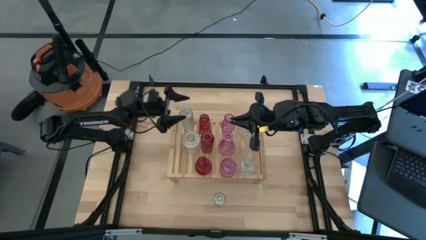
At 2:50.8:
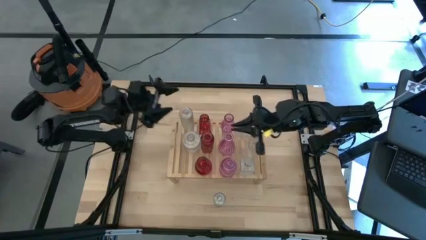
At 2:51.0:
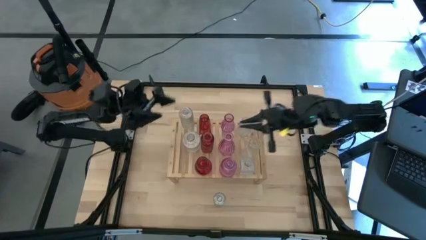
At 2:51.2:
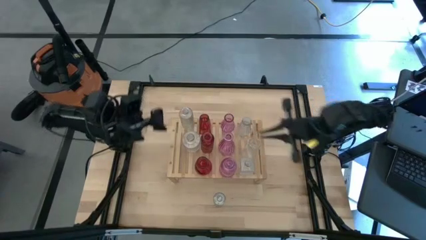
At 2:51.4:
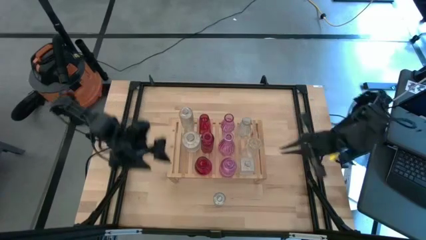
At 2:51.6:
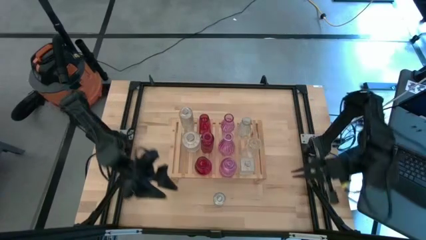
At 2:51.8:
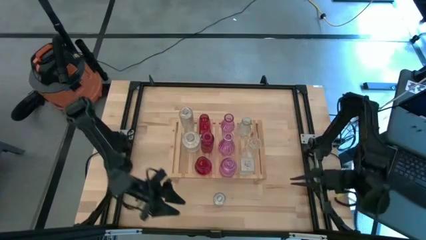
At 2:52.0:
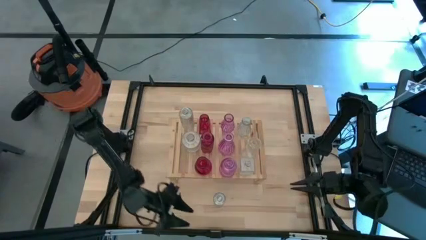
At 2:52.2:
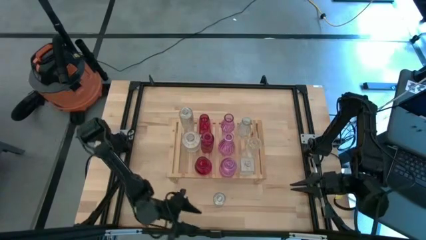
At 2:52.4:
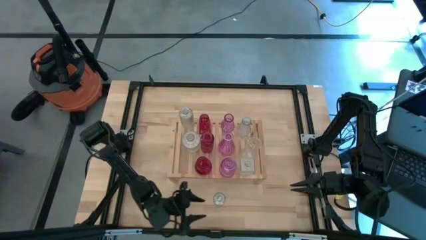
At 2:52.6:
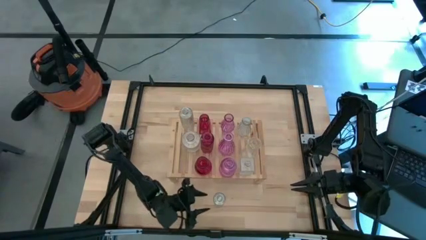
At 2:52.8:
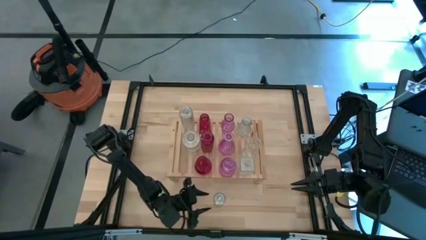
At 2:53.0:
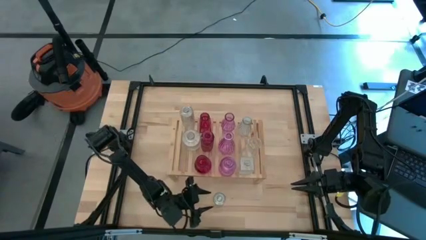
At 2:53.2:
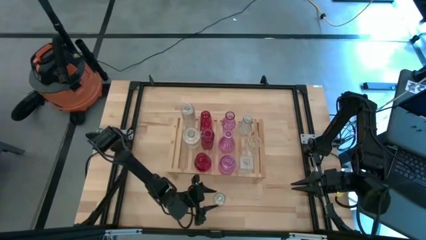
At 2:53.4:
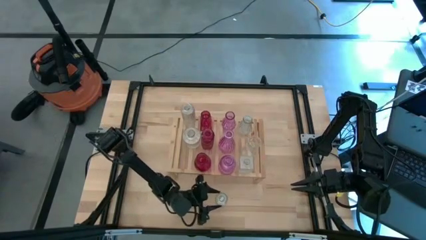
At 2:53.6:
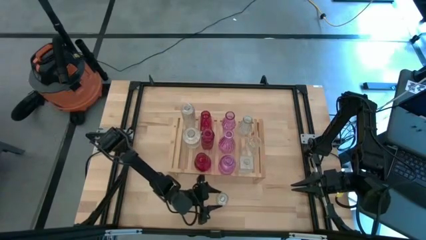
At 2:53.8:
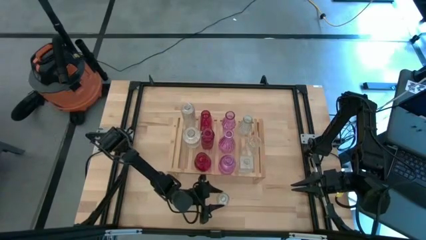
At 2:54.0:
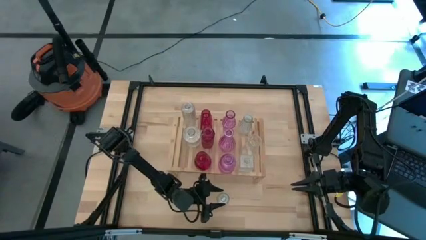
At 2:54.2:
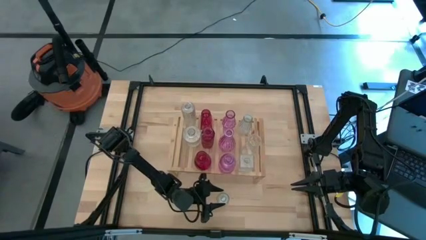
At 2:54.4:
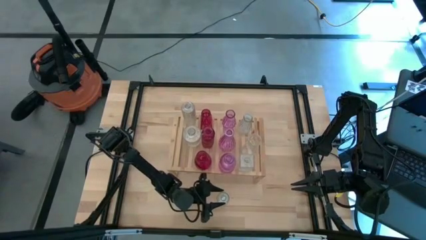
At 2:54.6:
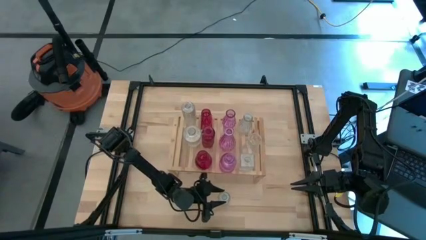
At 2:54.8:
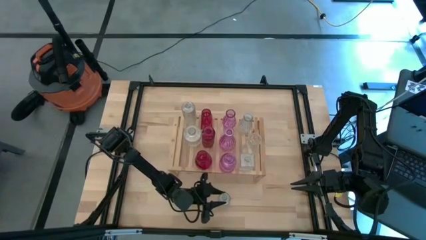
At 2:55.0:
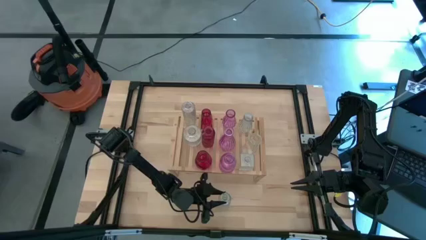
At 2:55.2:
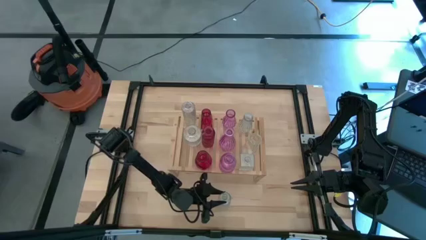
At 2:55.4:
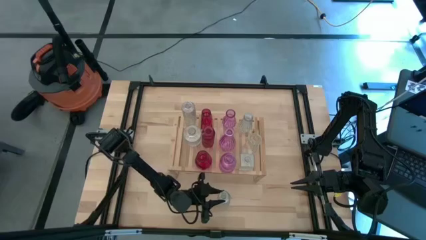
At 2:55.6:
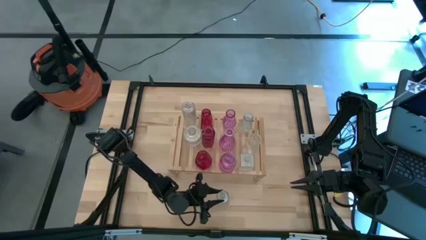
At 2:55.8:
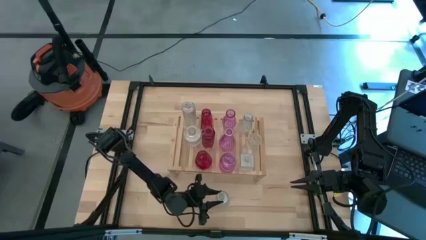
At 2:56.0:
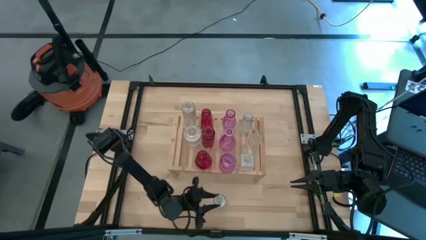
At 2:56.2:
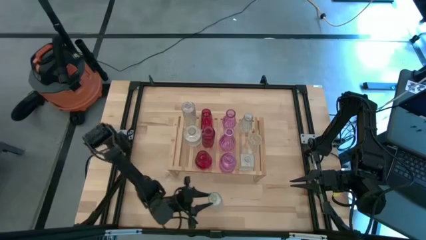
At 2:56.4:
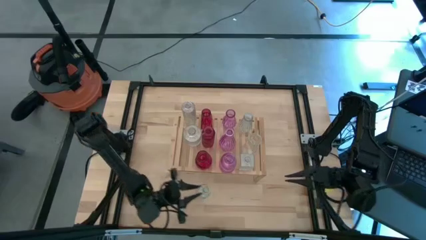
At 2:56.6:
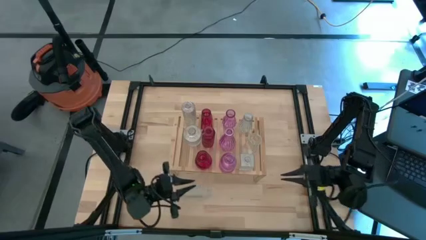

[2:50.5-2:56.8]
Task: sort vases onto shelf
Put the transparent vase on the shelf aligned with the other transparent vase

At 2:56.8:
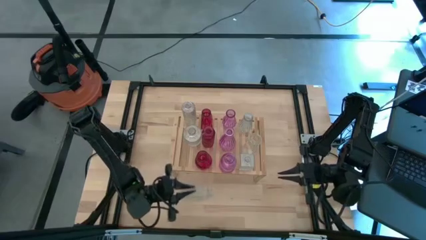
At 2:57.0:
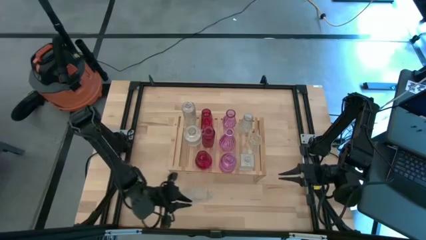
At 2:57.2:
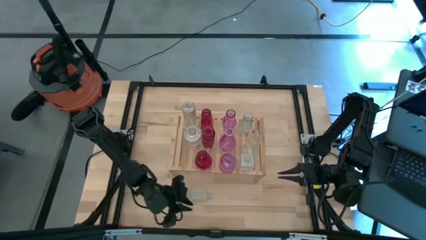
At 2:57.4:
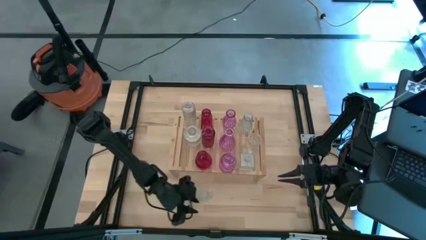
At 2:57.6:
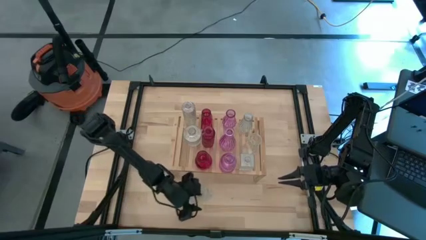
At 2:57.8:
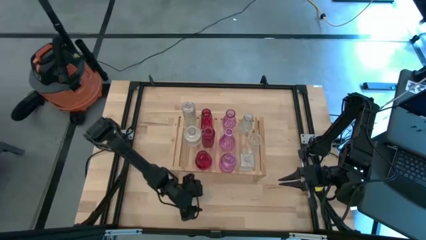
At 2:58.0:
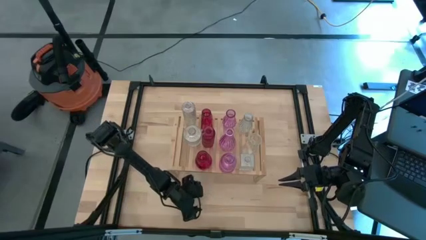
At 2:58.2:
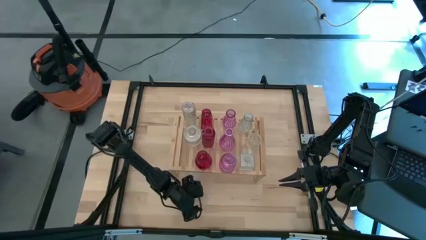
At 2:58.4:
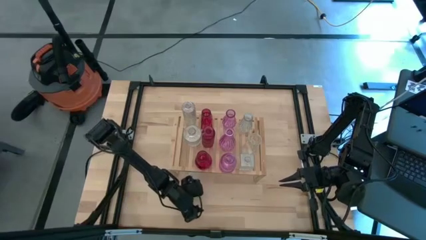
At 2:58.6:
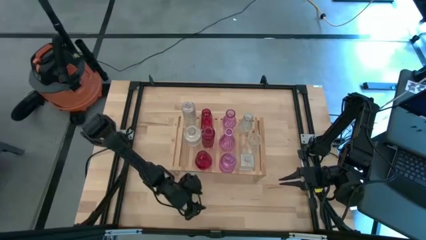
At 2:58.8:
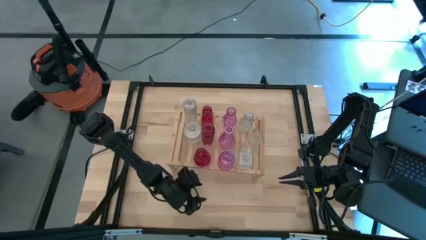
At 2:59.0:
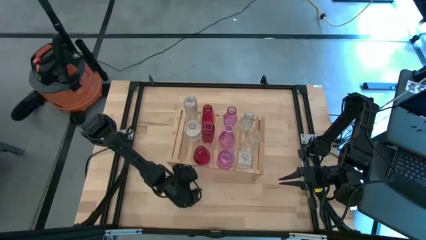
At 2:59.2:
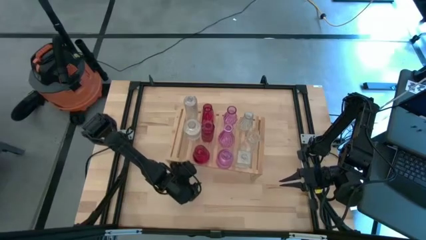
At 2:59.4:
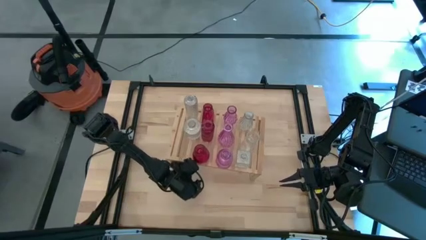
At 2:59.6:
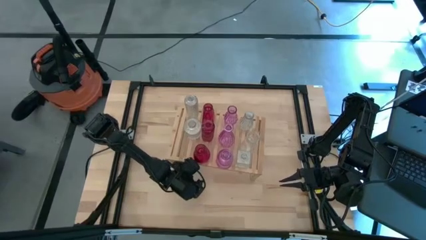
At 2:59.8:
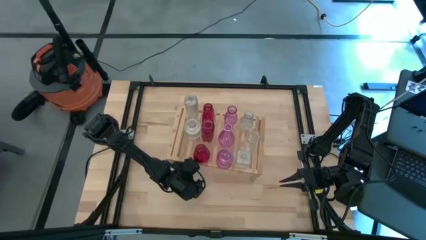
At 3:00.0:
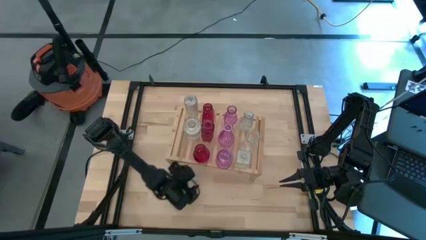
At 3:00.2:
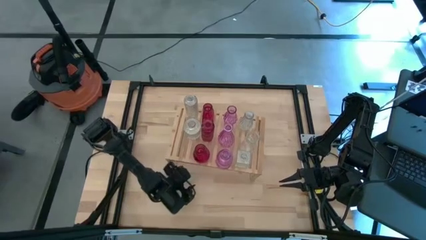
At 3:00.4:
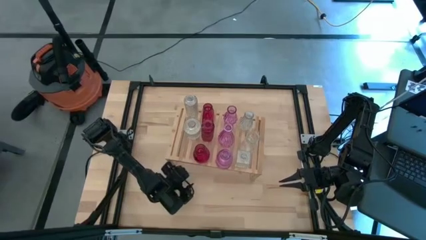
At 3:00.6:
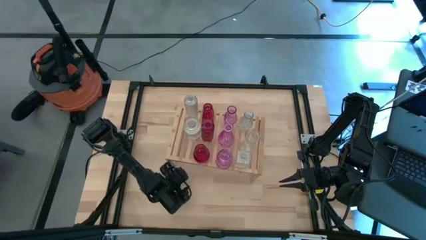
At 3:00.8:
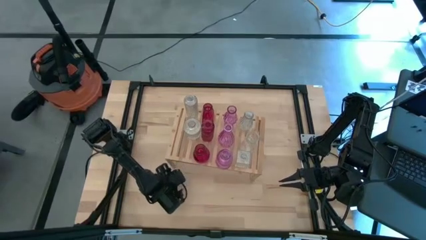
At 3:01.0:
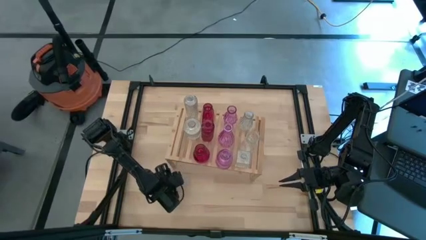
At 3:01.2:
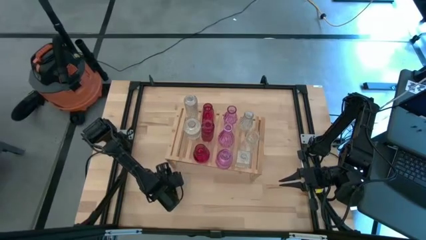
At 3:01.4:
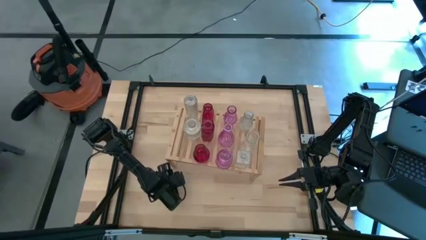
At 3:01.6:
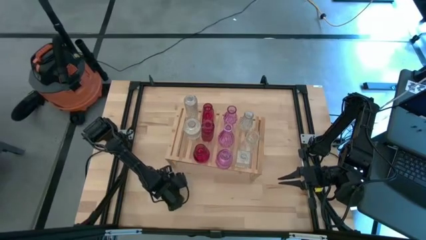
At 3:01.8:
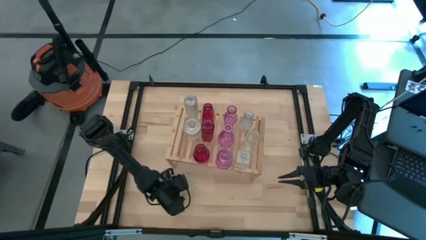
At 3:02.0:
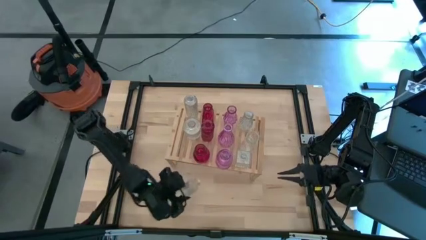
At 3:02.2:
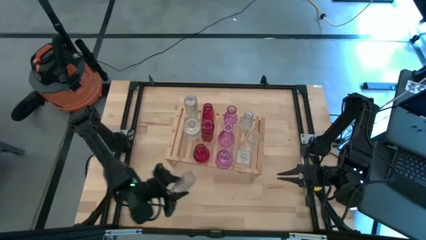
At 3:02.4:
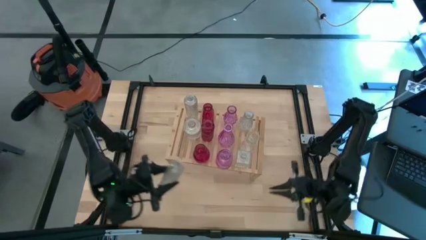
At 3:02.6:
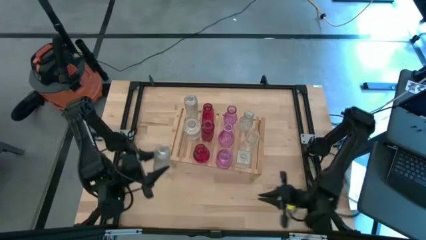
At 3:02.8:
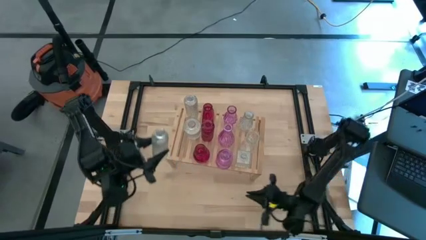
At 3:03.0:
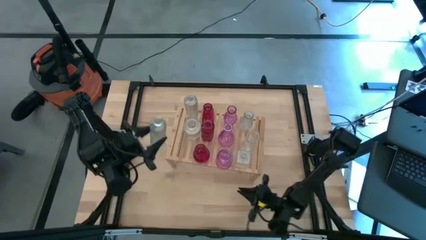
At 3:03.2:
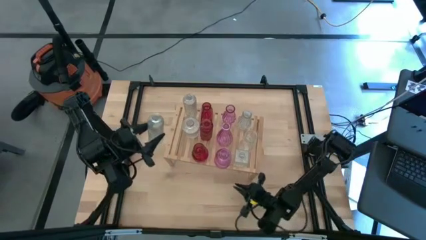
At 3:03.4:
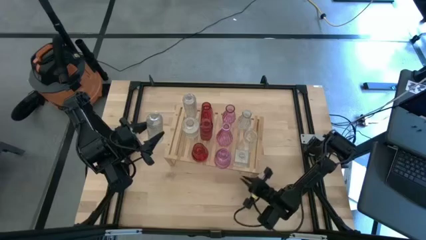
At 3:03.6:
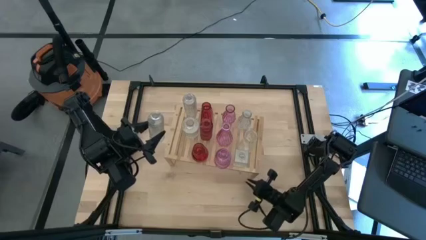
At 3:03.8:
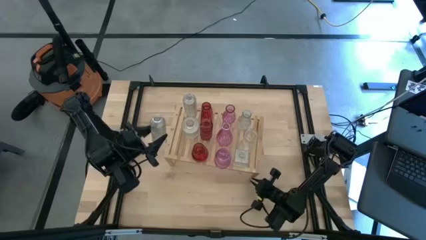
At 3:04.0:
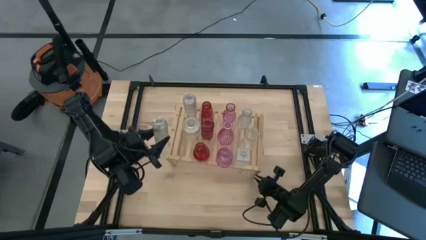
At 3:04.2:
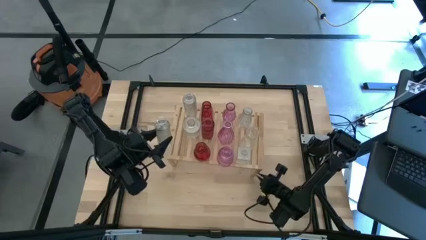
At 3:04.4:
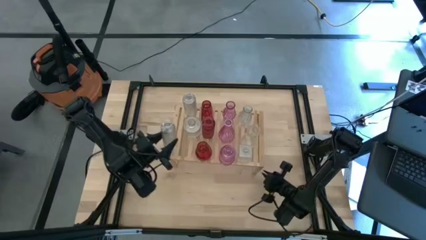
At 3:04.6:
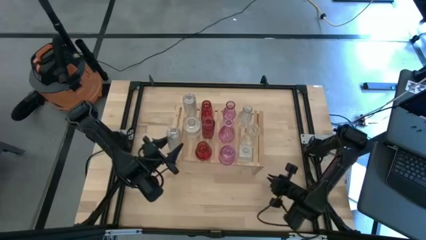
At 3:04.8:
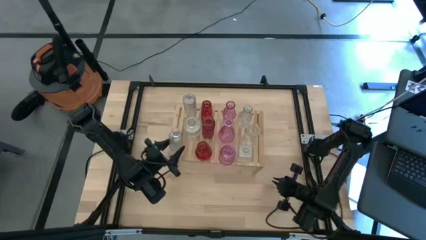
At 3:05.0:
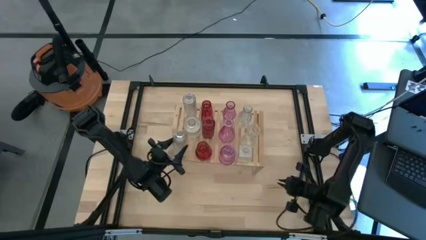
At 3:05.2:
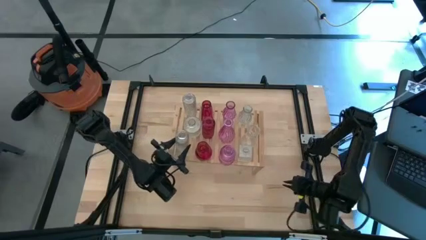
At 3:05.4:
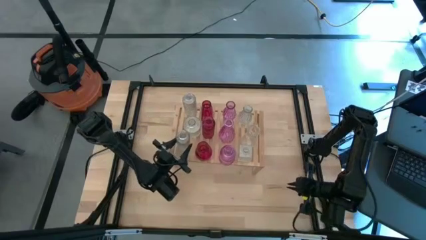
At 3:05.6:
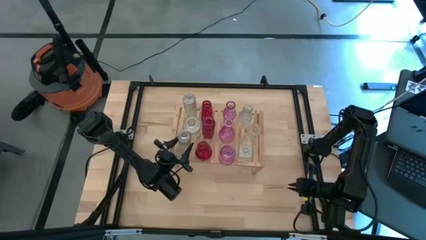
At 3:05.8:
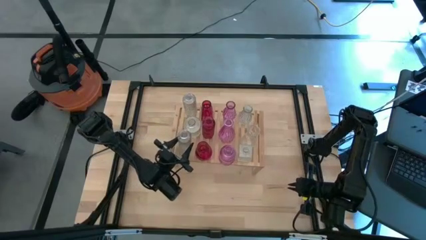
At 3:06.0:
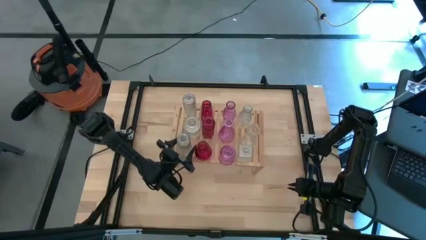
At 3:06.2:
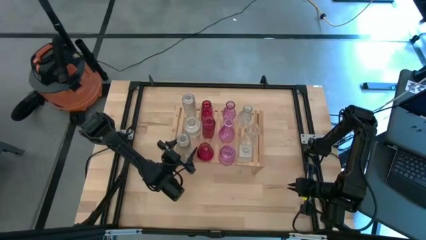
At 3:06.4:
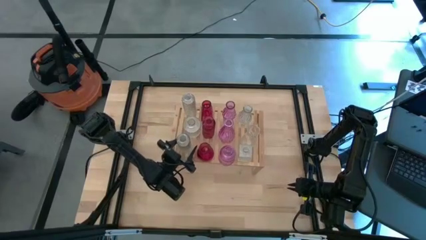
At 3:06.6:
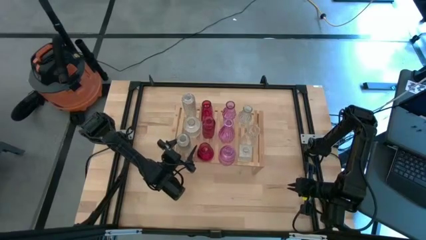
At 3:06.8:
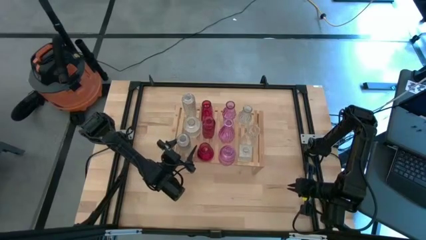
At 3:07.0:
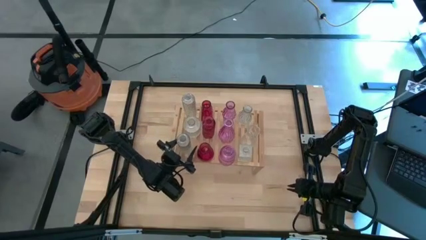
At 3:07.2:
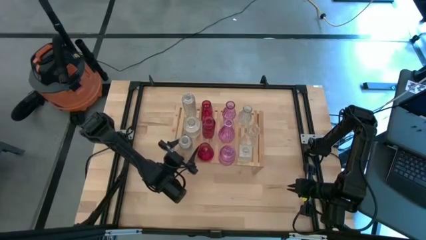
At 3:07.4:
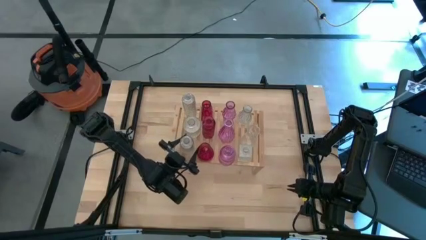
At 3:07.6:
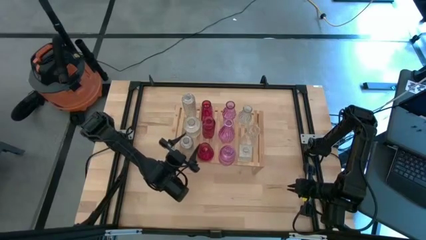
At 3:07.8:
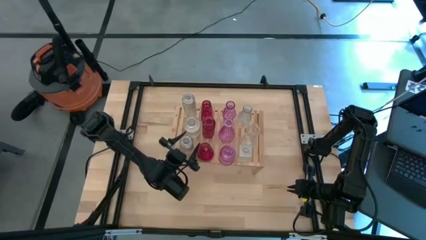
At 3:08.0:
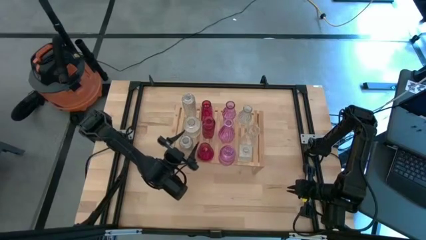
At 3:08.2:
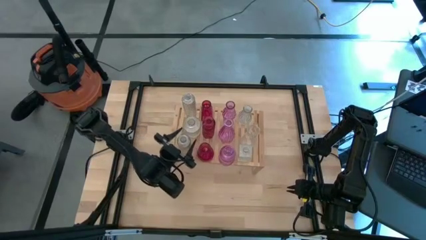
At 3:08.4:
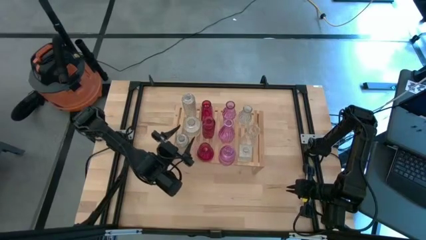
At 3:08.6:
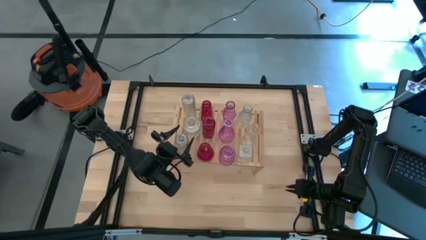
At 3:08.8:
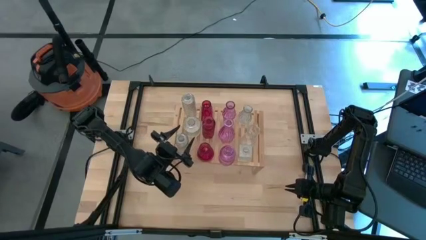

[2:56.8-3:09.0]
Put the transparent vase on the shelf aligned with the other transparent vase
